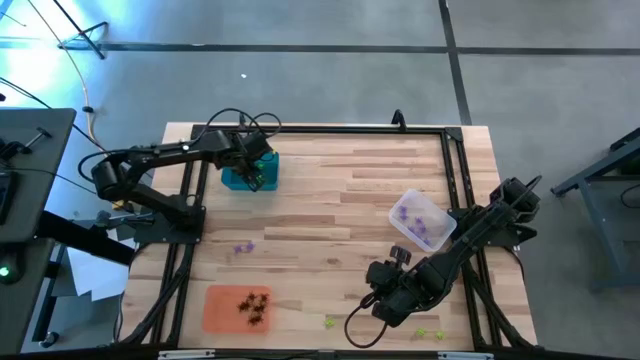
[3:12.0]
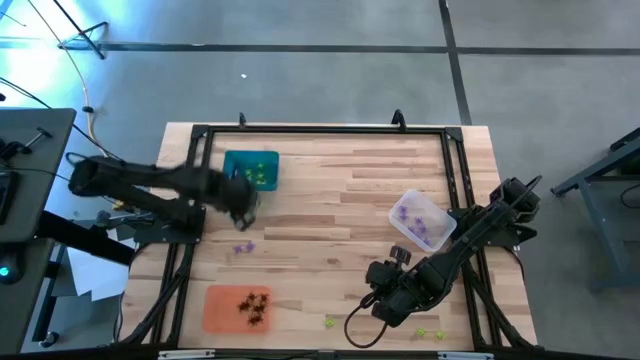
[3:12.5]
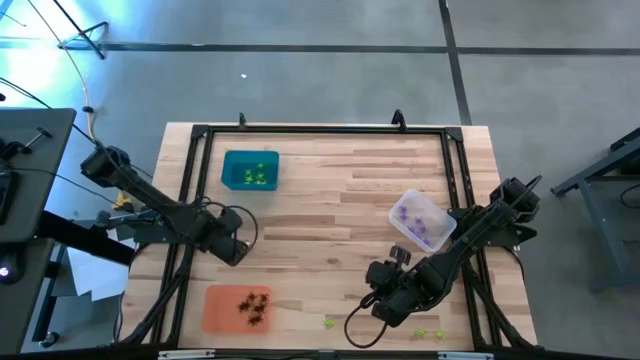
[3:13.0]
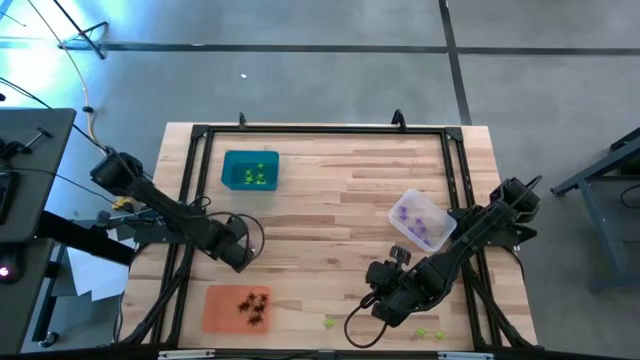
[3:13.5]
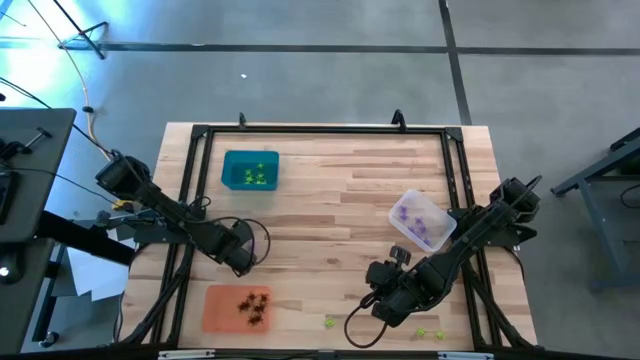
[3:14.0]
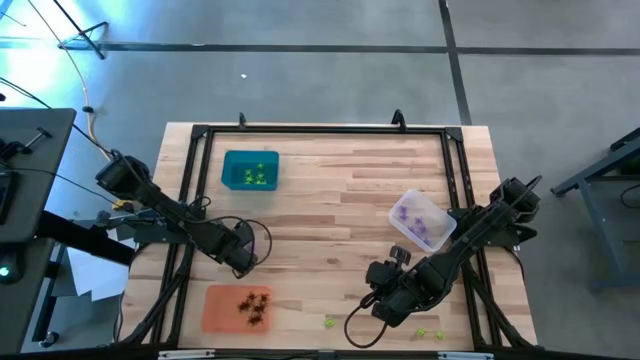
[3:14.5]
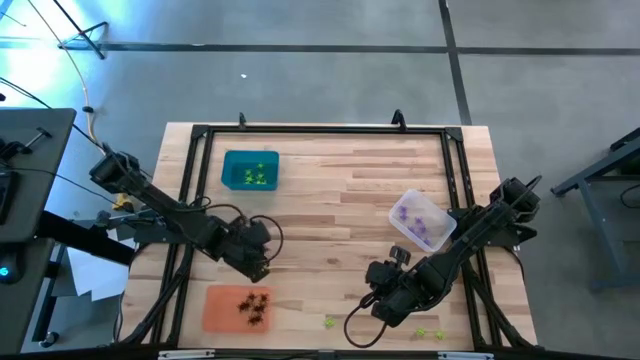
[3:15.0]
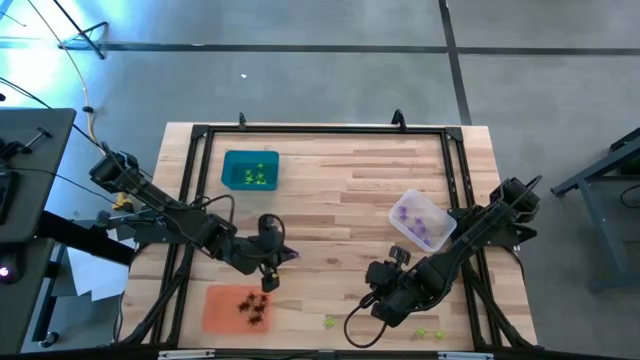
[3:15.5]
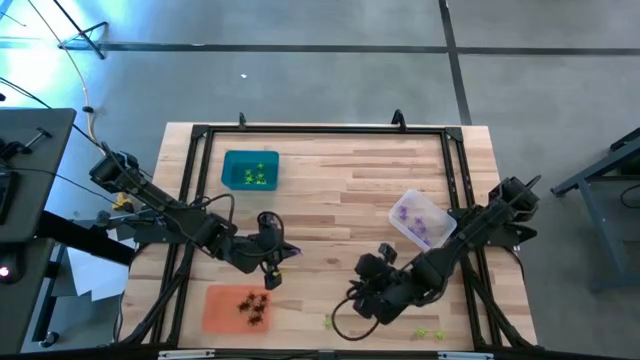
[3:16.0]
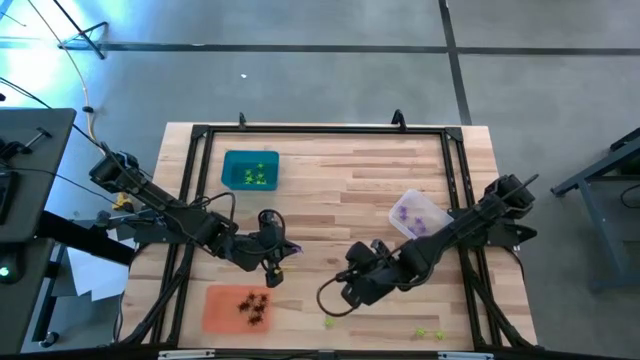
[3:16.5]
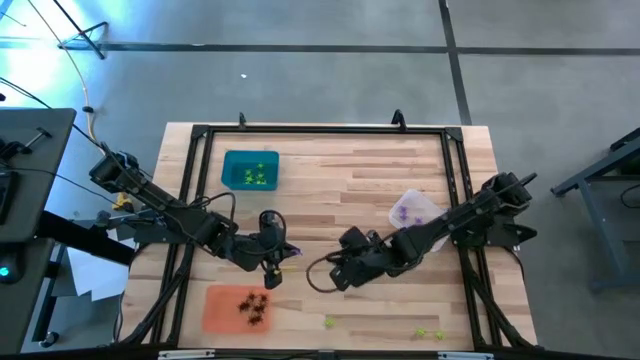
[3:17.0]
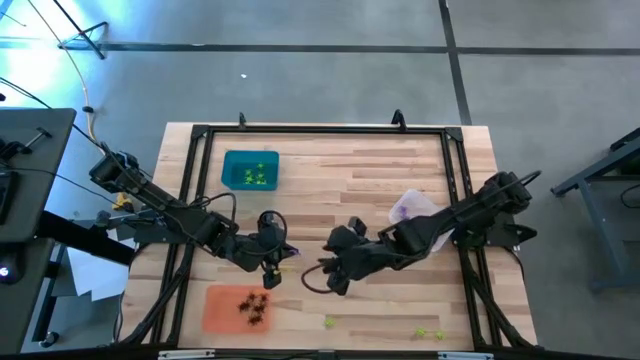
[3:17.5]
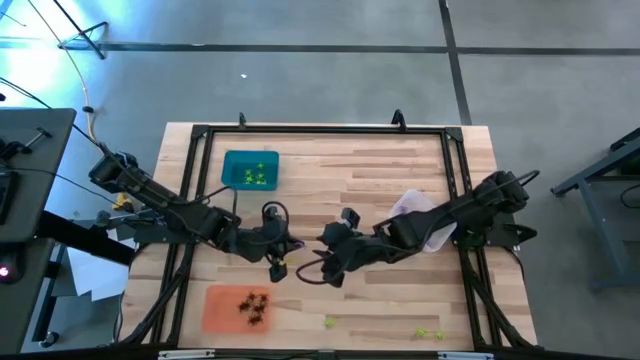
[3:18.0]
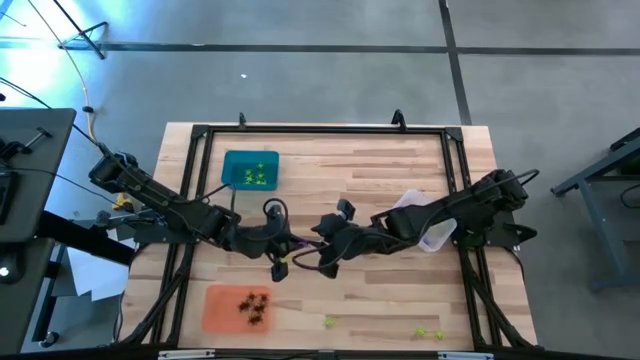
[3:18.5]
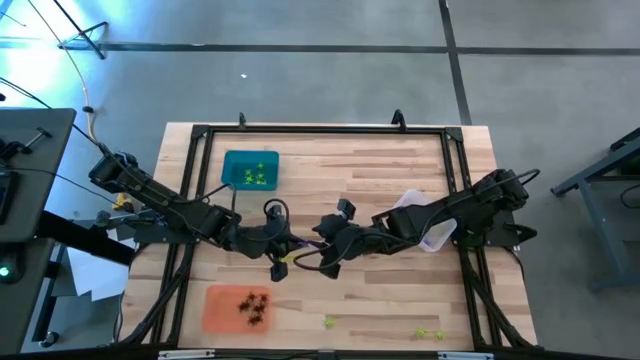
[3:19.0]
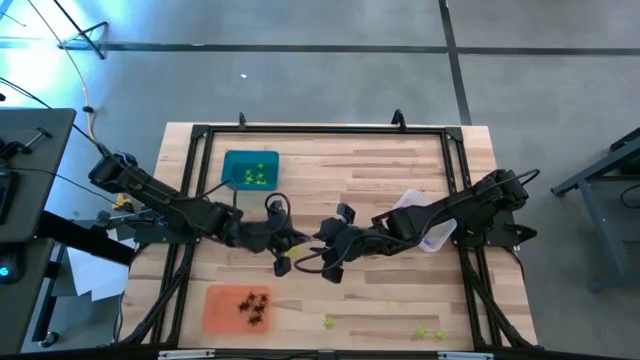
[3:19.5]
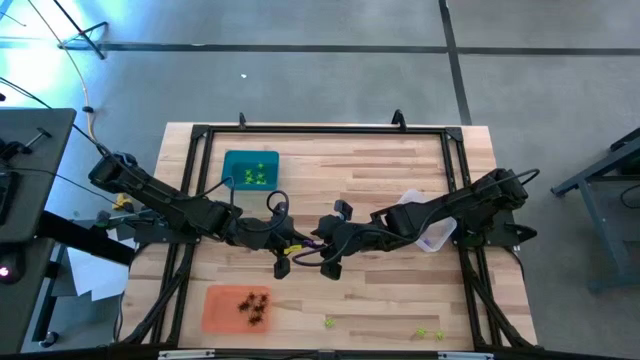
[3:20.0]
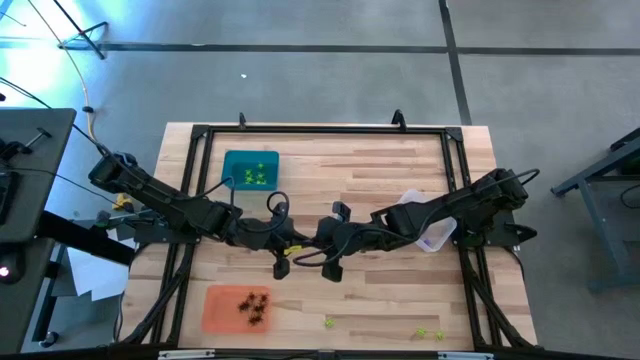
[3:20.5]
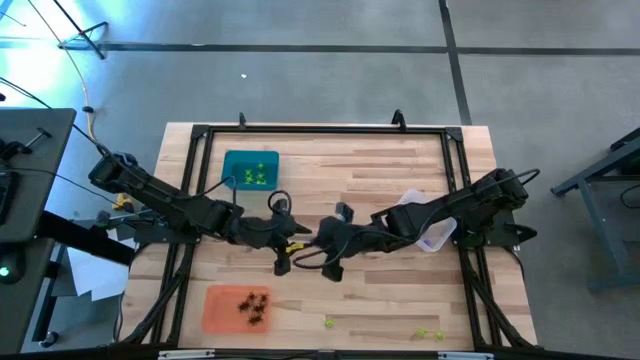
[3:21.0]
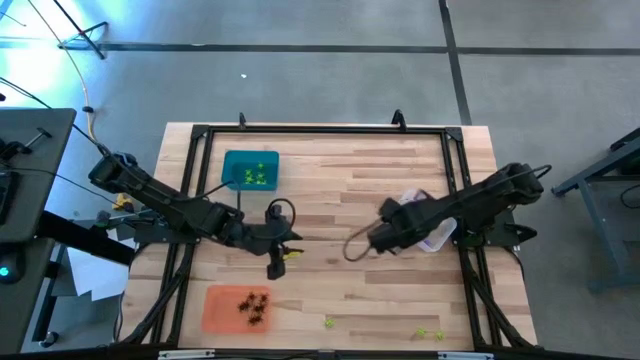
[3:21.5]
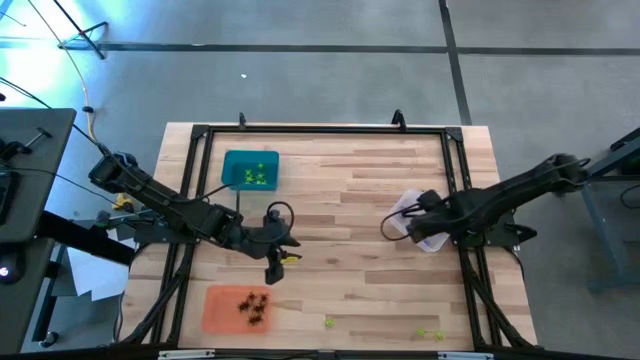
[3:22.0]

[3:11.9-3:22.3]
Task: Sort Halloween decoration
Put the violet spider toy into the transparent bin

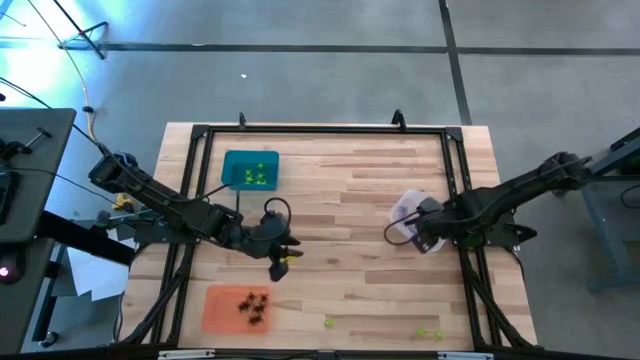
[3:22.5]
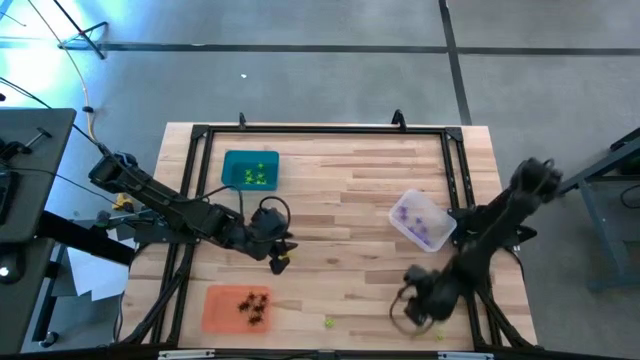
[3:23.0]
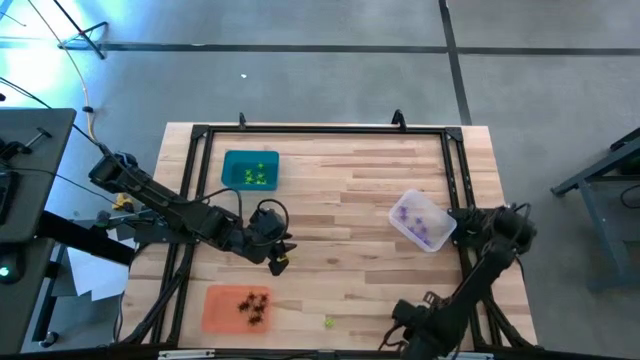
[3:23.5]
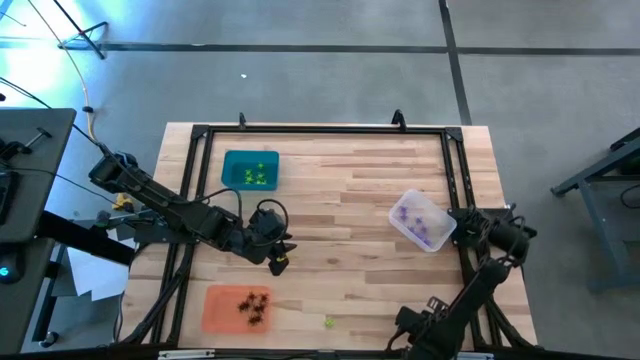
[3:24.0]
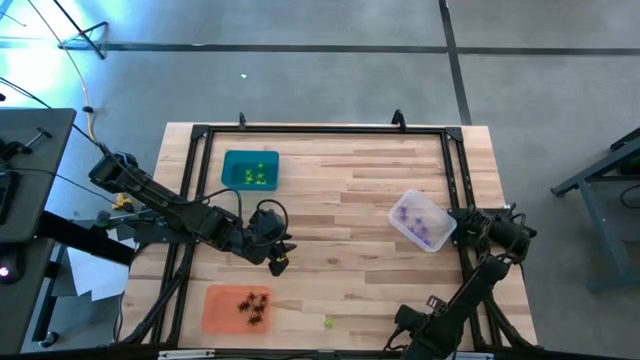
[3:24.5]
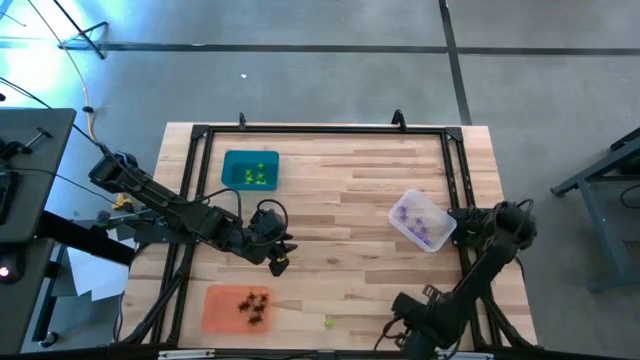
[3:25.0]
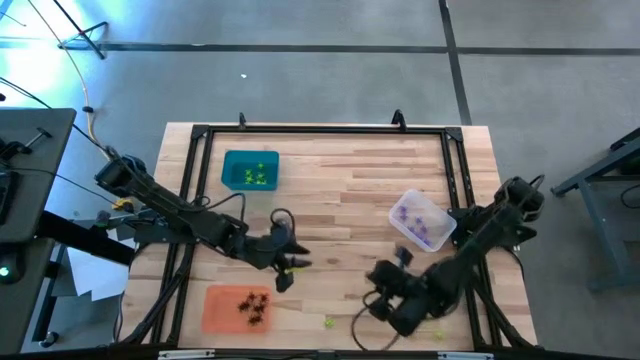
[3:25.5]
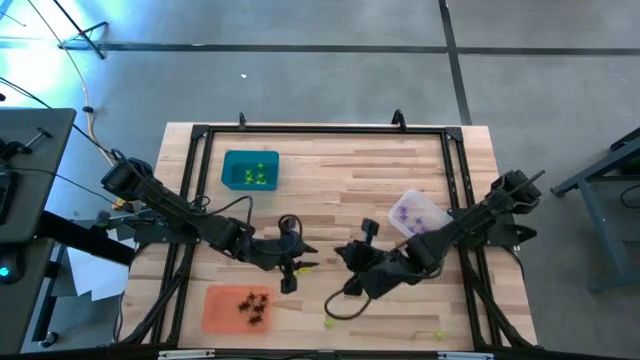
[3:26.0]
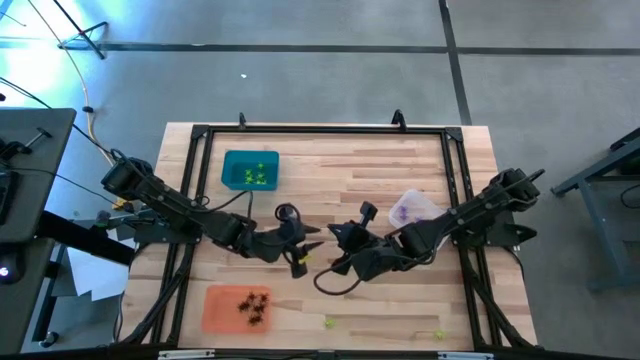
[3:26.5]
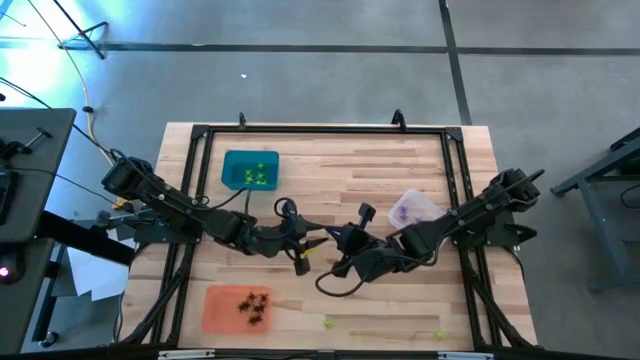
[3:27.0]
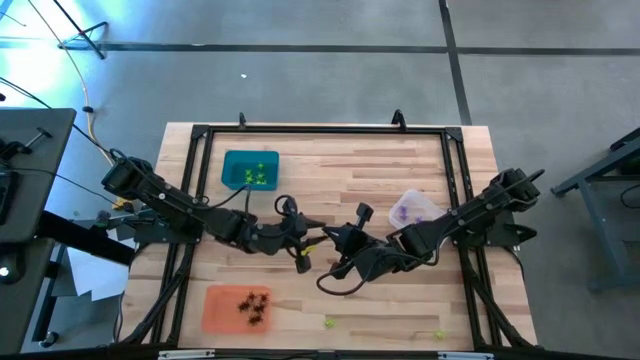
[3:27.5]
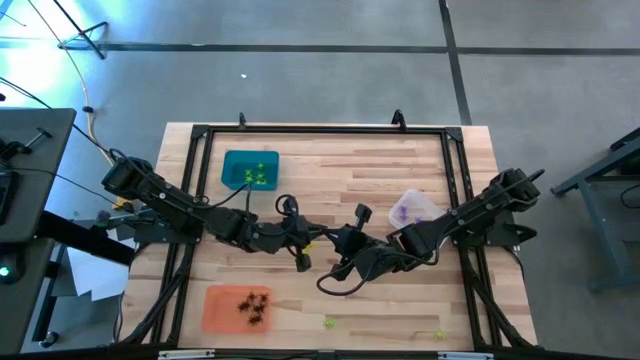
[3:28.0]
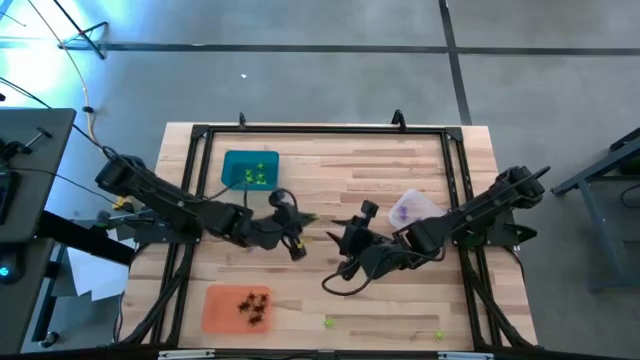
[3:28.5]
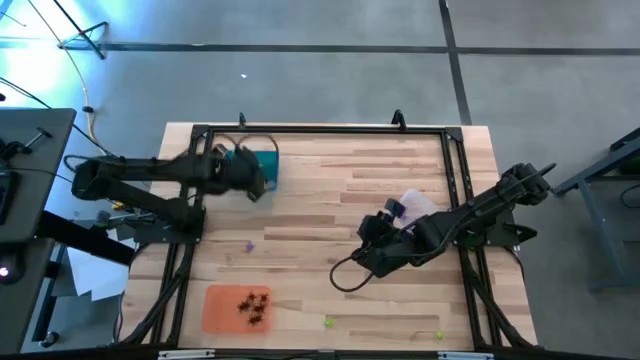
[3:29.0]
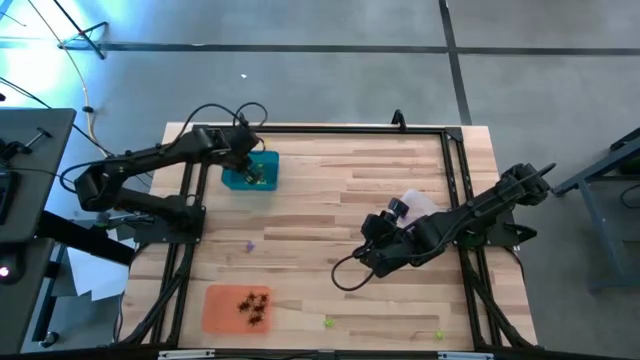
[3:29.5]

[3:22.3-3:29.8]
Put the green spider toy into the blue bin

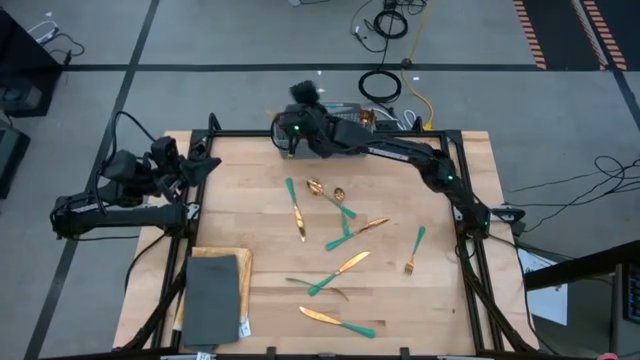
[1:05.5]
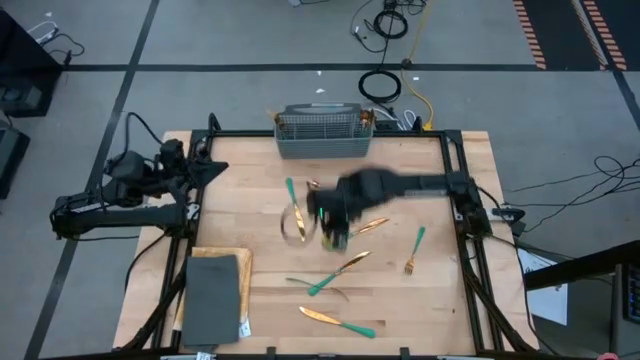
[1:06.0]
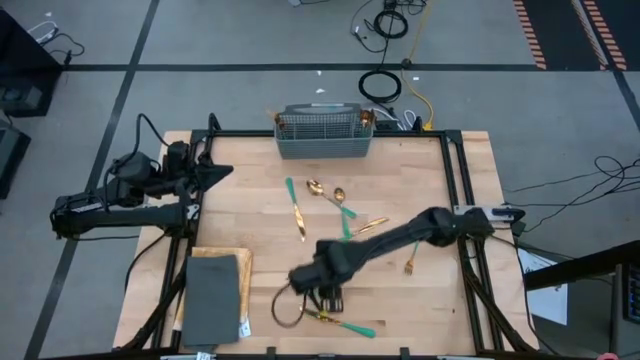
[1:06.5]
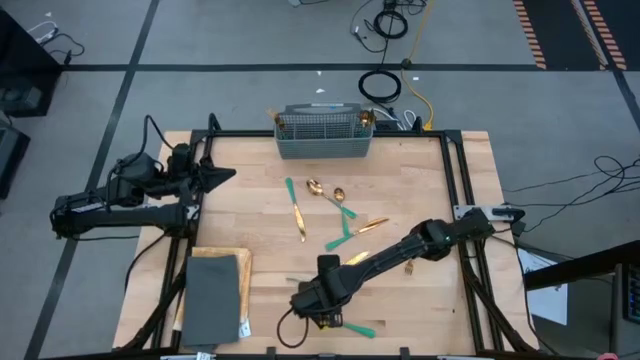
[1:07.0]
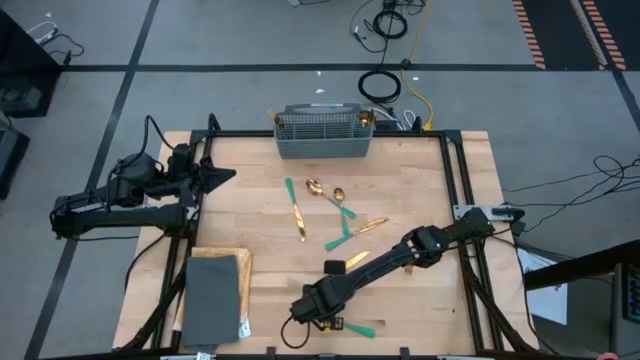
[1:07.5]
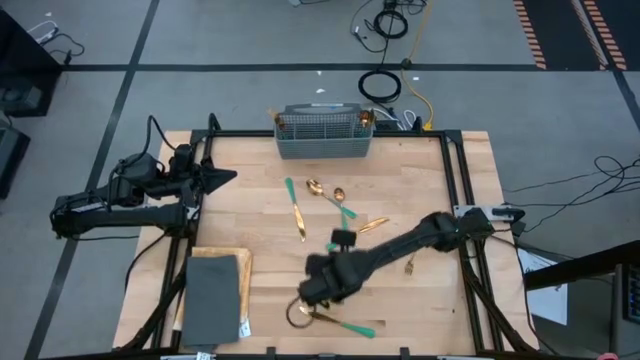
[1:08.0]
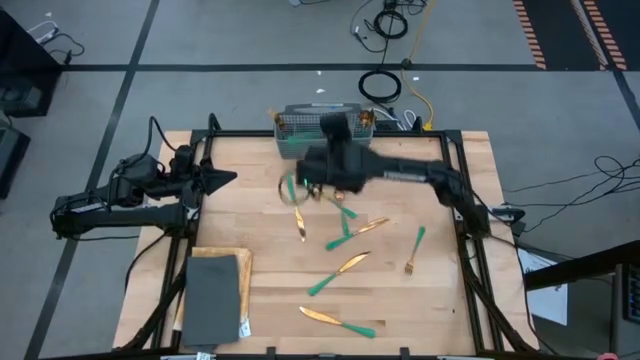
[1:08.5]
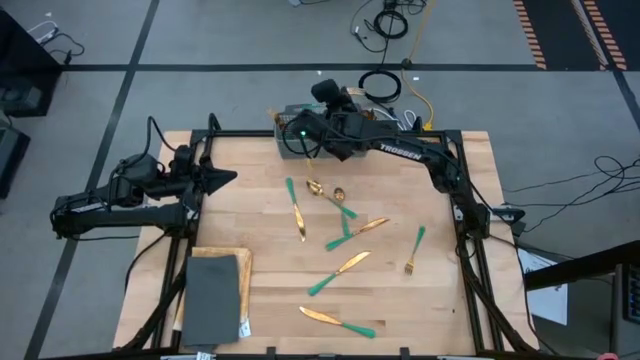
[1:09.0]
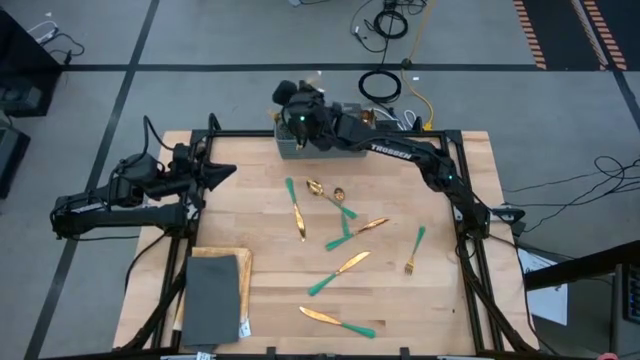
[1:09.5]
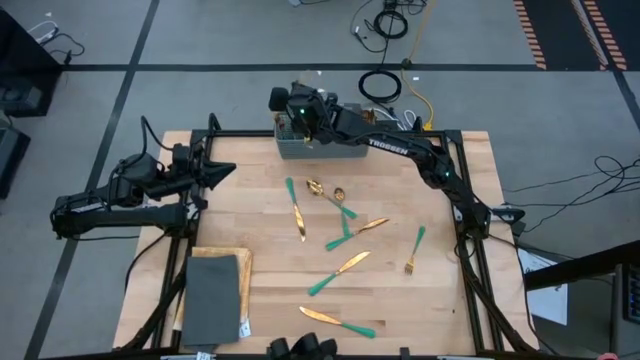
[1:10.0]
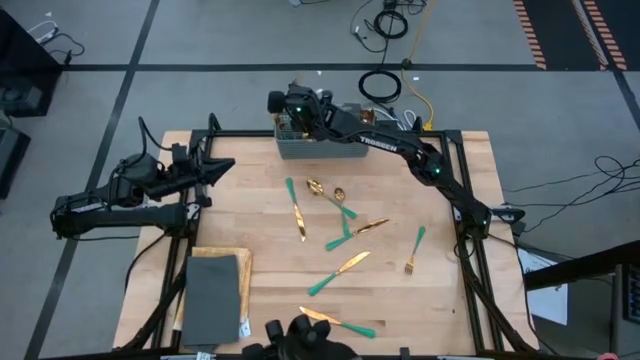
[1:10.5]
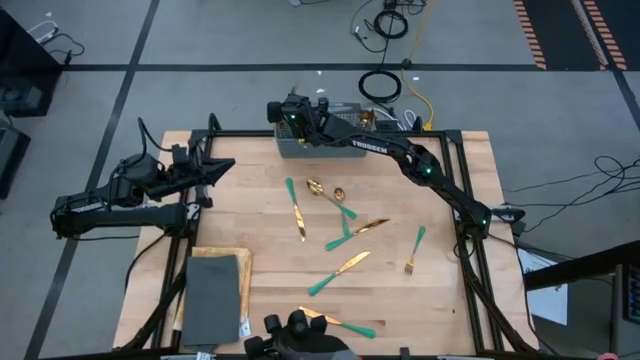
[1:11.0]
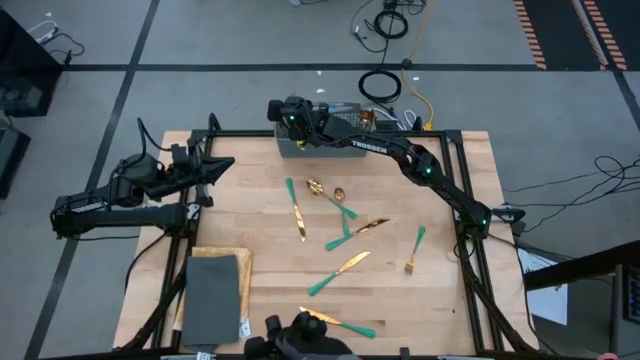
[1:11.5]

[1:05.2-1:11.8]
Task: Sort silverware
Put the green fork into the silverware basket
